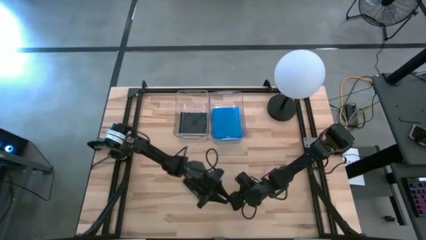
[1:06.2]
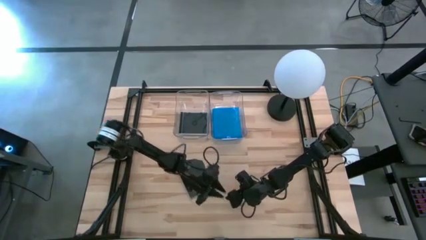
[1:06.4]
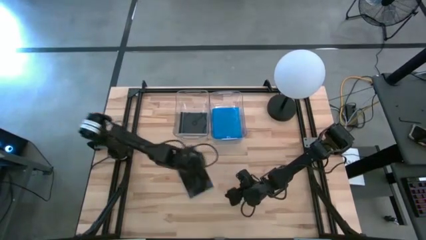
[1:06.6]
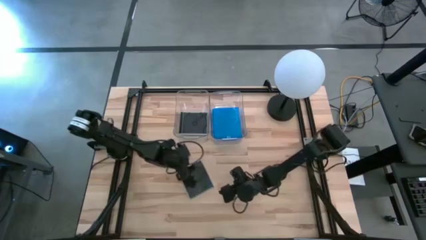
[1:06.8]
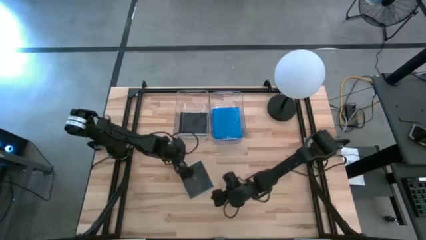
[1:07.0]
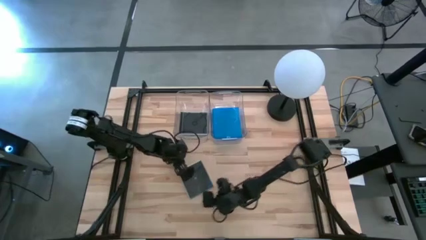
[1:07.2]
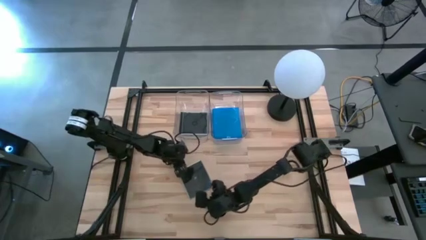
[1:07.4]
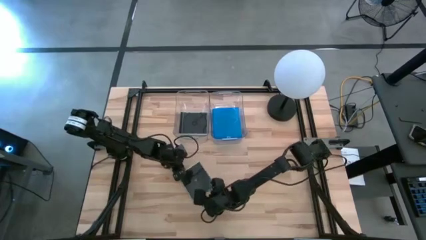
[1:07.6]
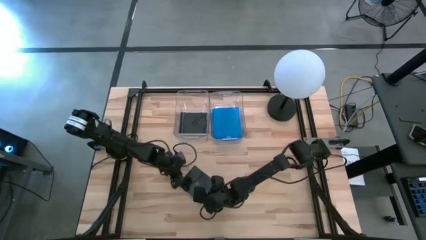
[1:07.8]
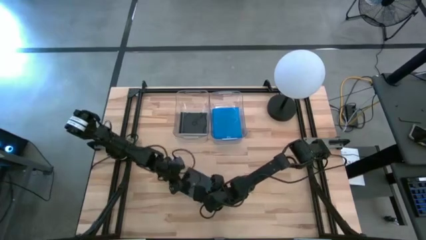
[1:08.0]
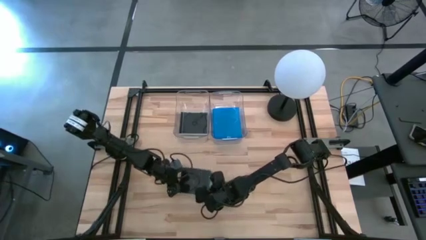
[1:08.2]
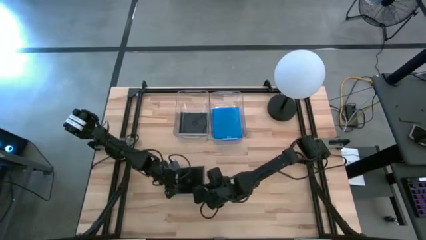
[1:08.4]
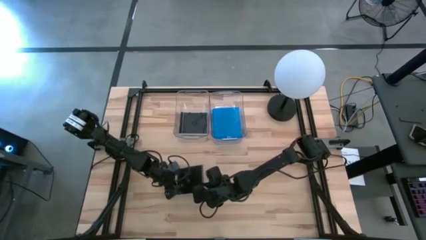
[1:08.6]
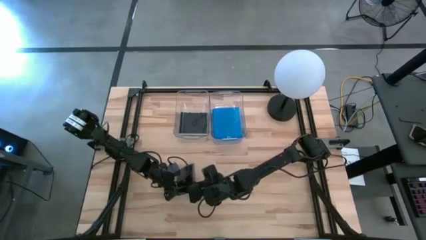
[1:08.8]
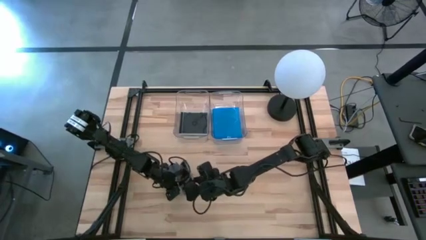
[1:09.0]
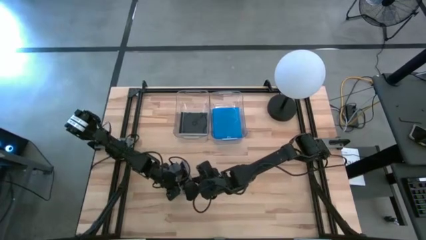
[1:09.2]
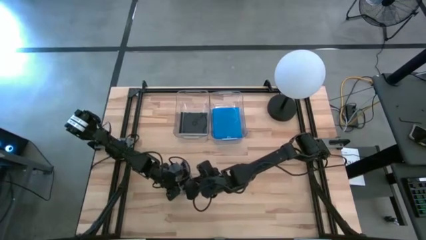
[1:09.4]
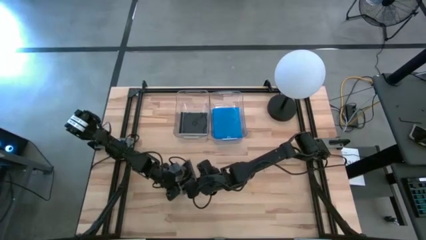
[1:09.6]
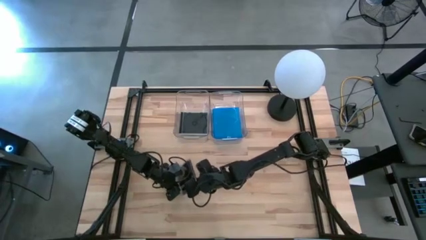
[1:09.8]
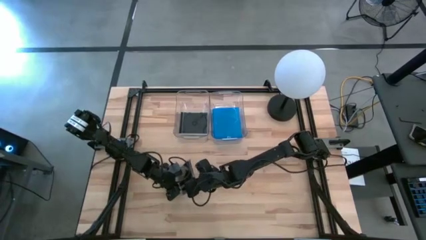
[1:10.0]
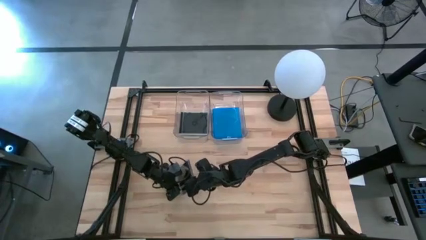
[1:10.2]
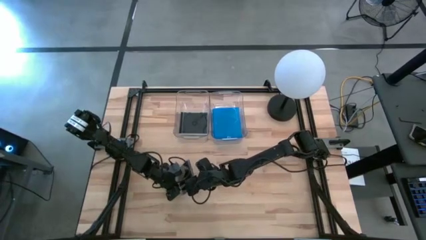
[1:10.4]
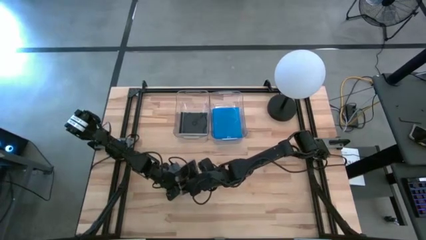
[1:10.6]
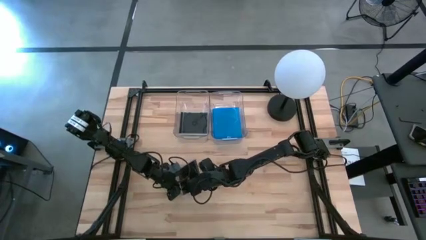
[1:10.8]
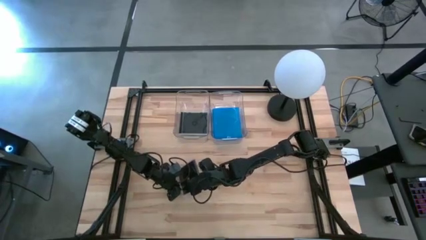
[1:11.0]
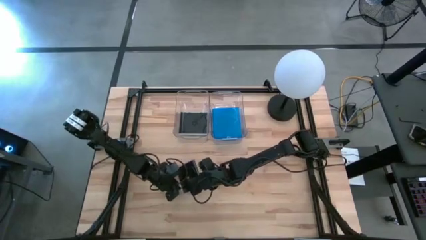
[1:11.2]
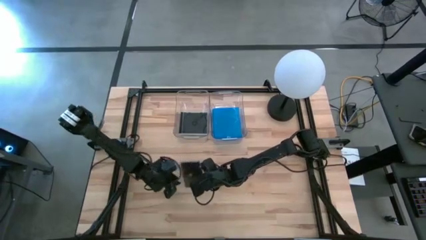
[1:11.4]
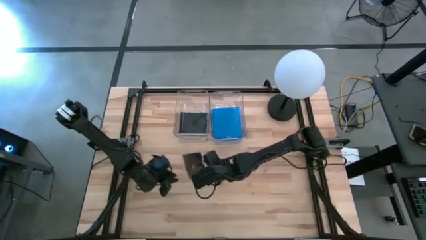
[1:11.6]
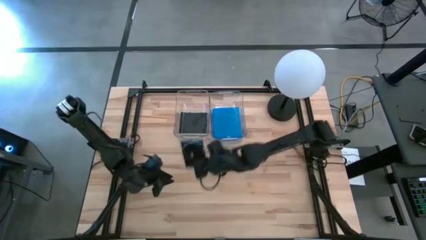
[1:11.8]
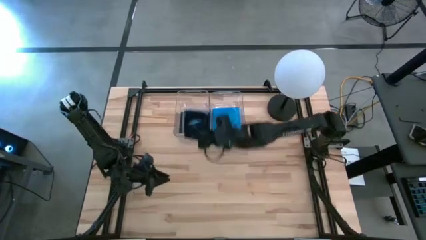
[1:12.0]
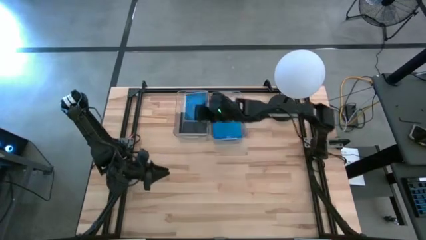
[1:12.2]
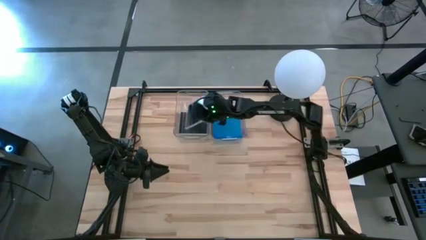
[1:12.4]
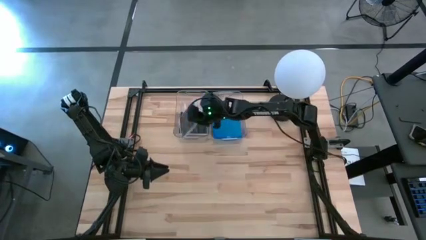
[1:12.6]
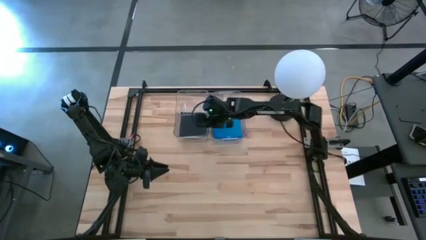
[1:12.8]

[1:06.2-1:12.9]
Task: Pick & place jewel cases by type
Put the black CD case into the left transparent bin

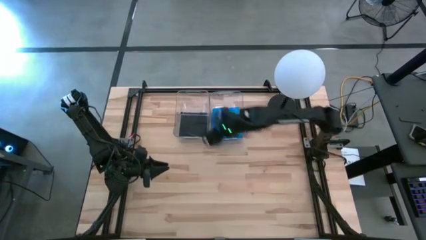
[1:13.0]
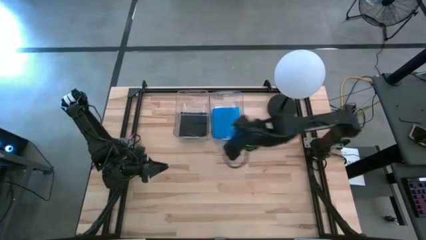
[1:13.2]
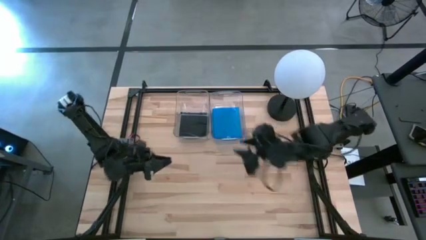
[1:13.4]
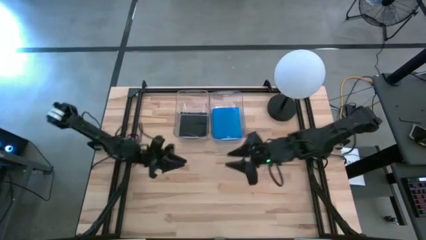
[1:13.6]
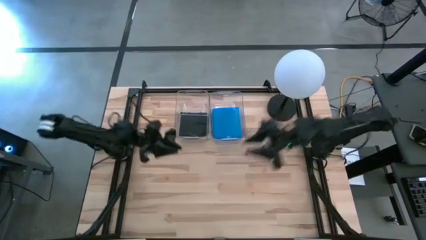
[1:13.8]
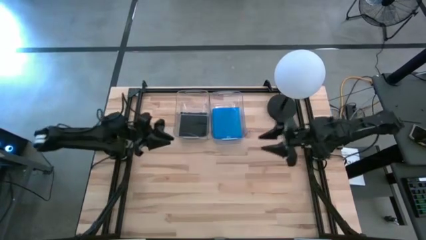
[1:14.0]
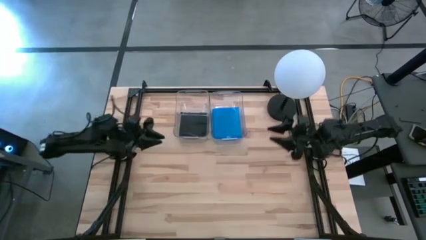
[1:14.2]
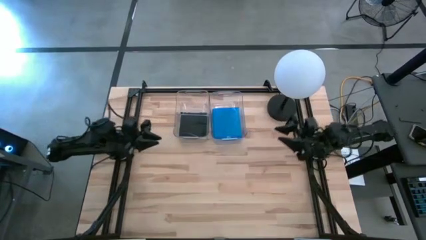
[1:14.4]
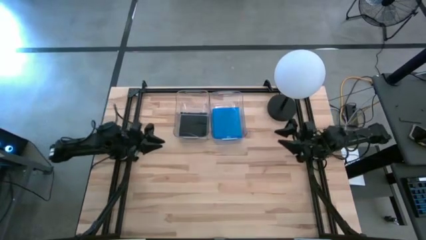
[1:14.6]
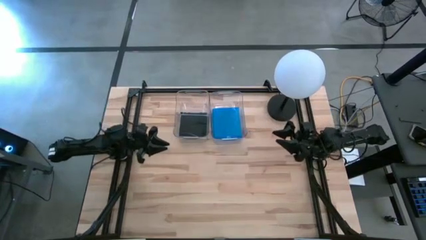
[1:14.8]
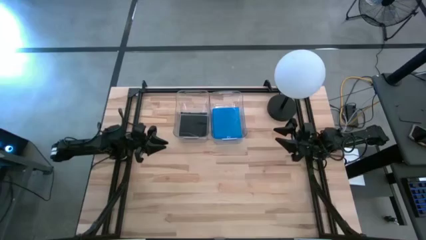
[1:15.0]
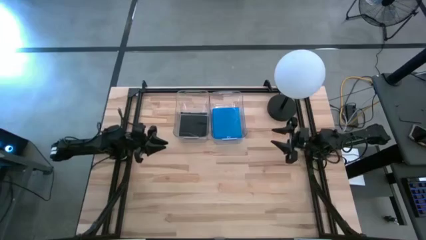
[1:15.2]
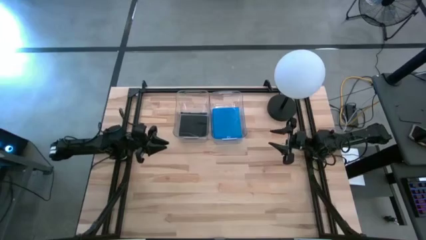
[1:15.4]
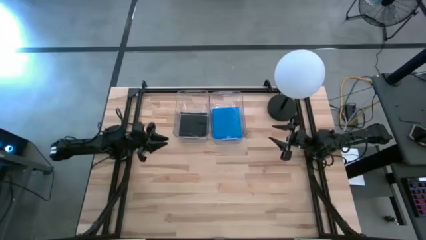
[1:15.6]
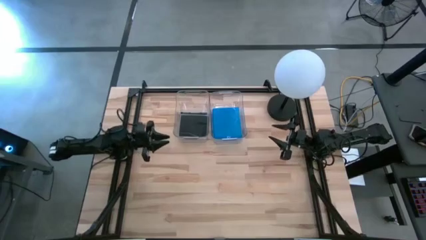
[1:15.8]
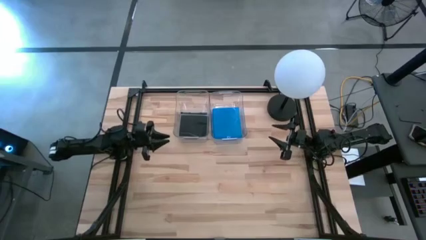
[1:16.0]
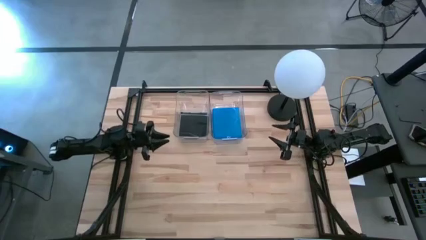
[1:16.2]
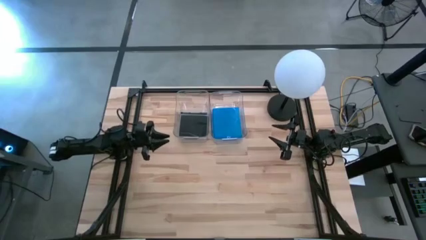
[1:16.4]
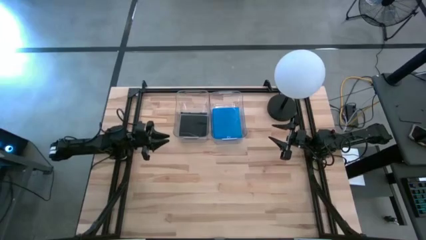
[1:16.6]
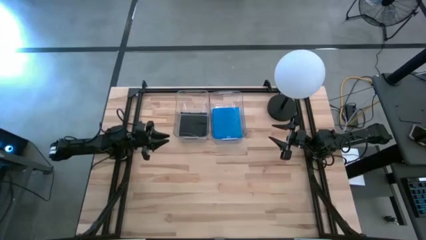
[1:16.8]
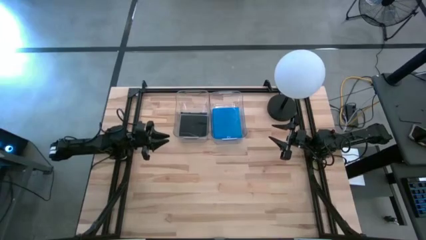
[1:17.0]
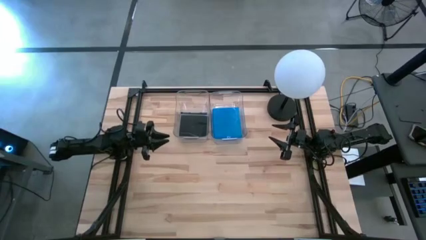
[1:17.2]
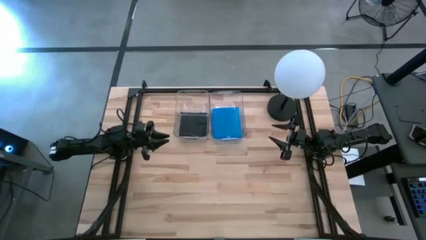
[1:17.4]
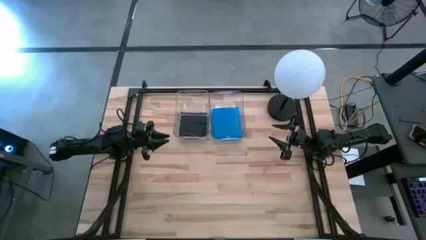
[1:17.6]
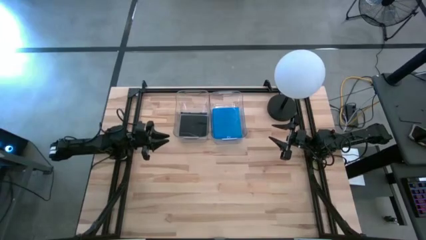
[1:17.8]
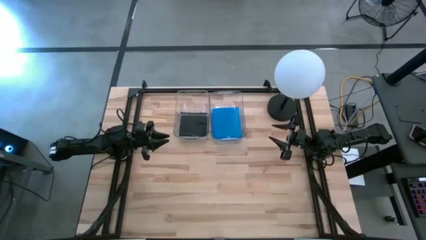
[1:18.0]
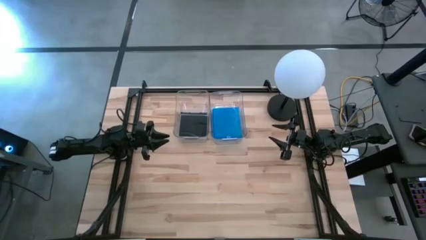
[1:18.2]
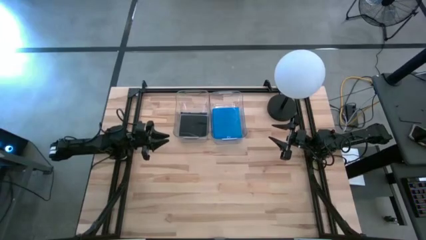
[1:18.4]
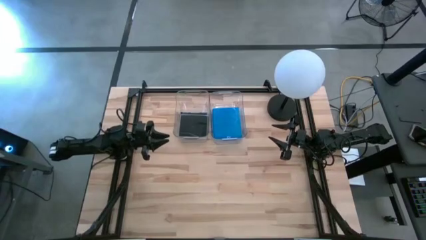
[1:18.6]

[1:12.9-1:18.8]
Return to Home Position
